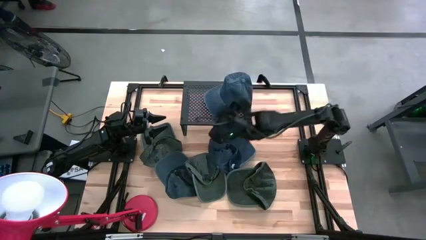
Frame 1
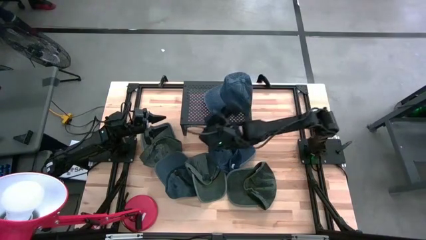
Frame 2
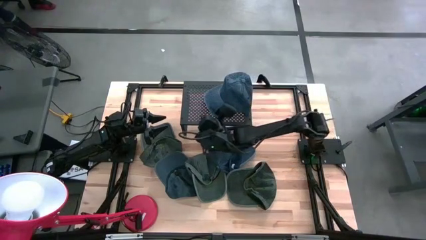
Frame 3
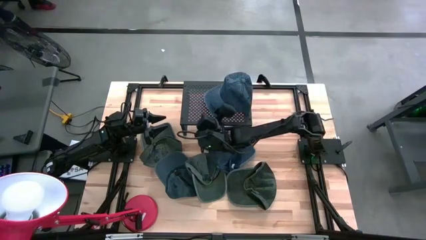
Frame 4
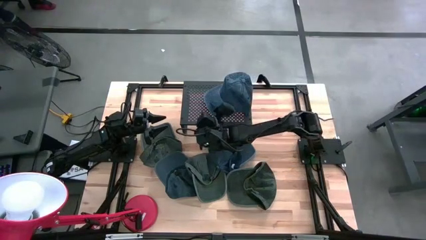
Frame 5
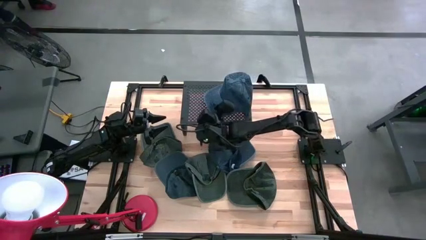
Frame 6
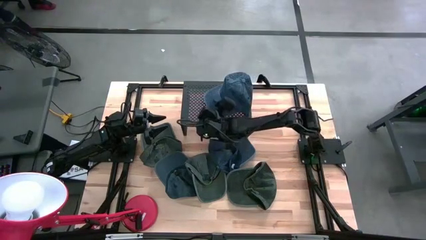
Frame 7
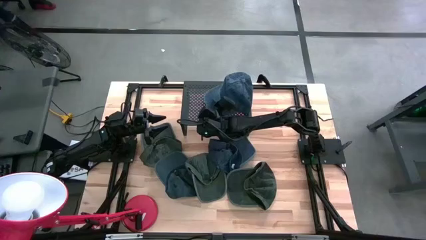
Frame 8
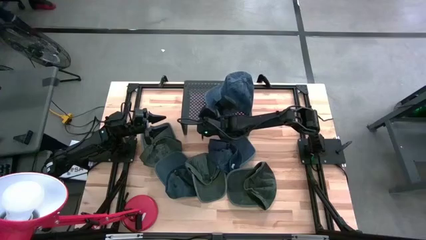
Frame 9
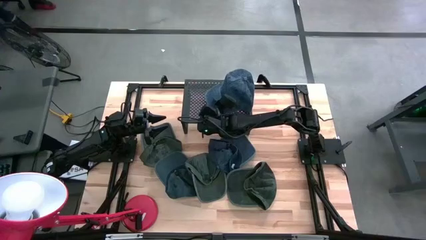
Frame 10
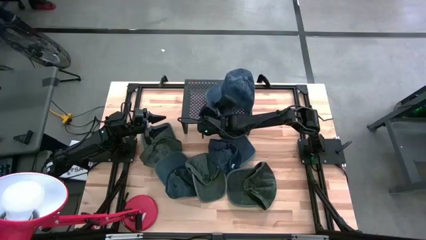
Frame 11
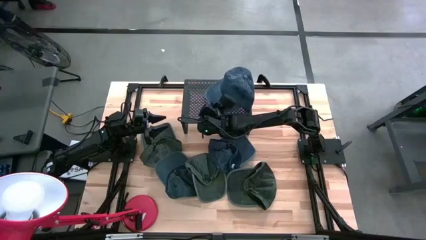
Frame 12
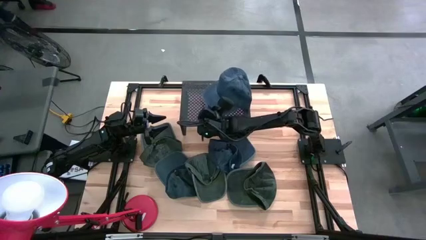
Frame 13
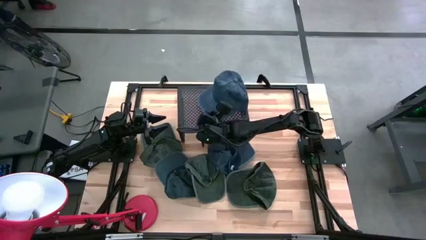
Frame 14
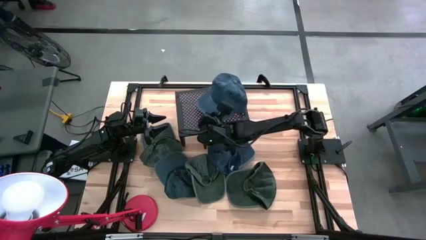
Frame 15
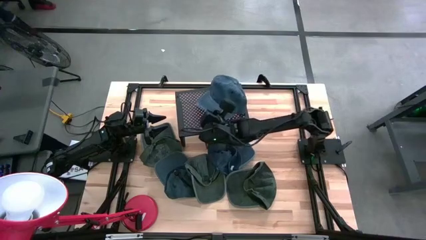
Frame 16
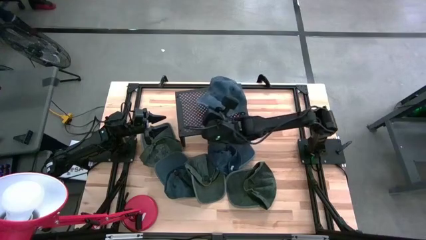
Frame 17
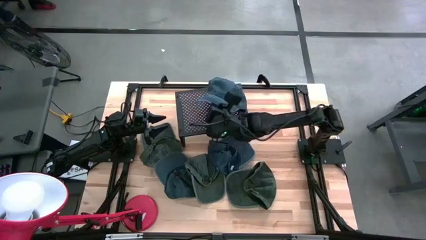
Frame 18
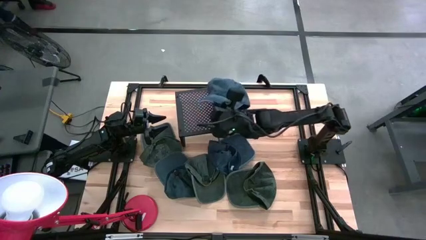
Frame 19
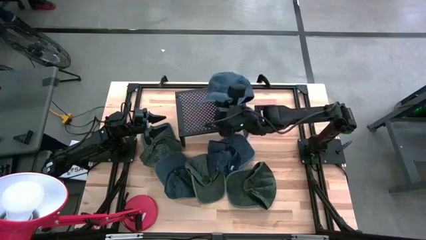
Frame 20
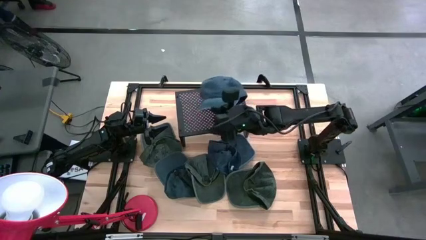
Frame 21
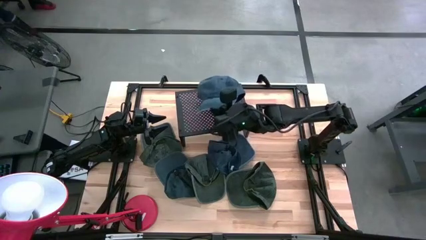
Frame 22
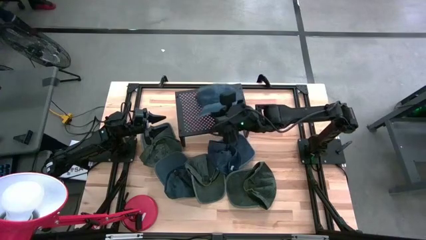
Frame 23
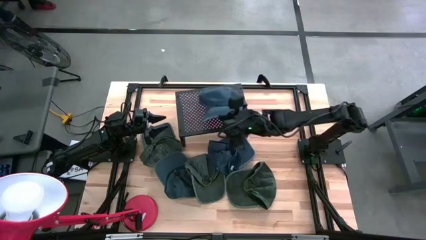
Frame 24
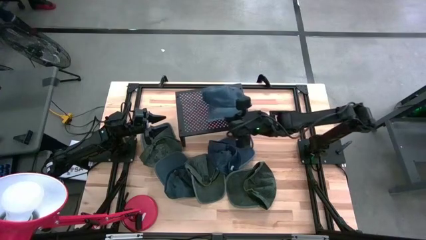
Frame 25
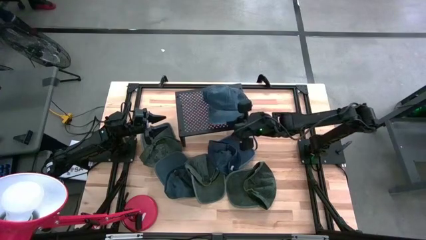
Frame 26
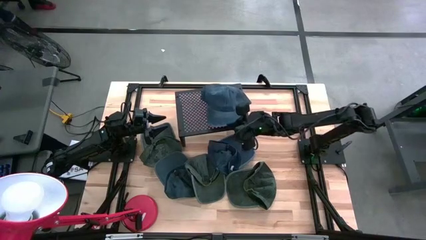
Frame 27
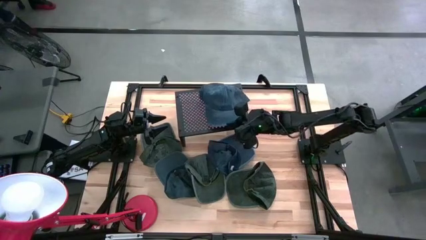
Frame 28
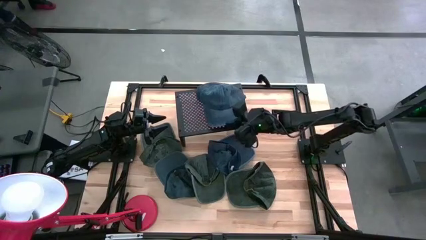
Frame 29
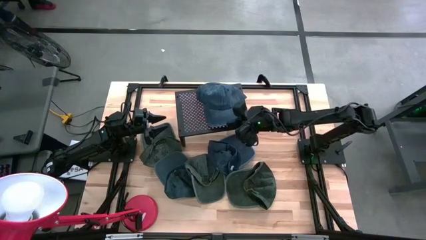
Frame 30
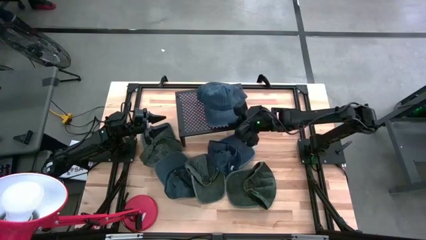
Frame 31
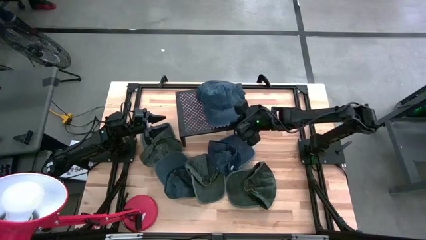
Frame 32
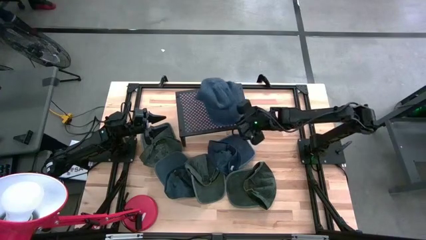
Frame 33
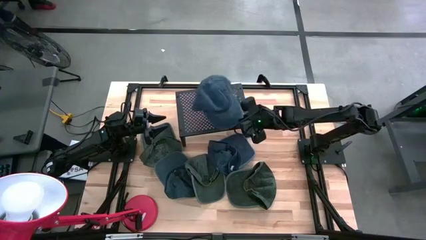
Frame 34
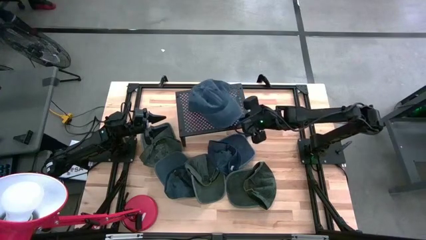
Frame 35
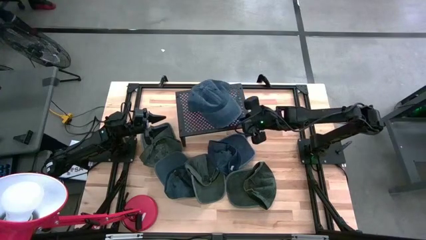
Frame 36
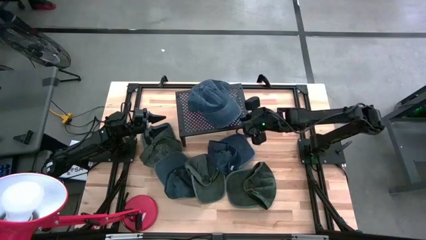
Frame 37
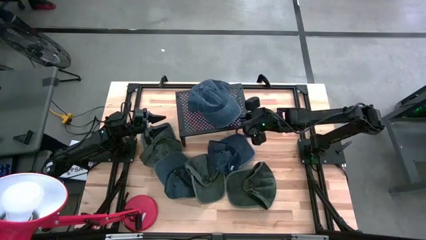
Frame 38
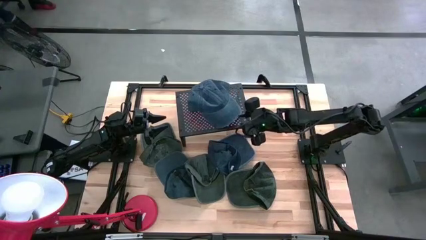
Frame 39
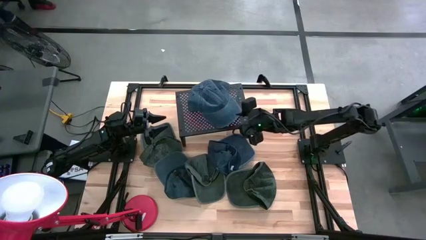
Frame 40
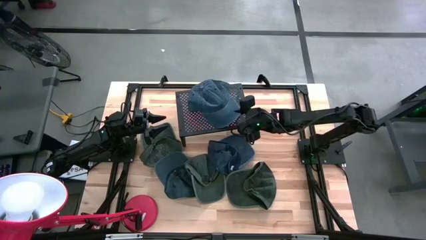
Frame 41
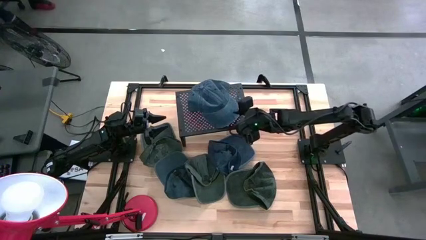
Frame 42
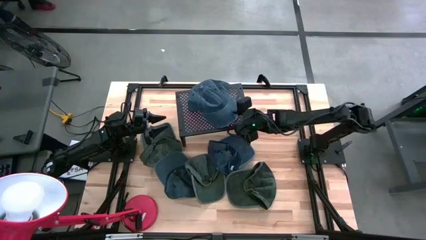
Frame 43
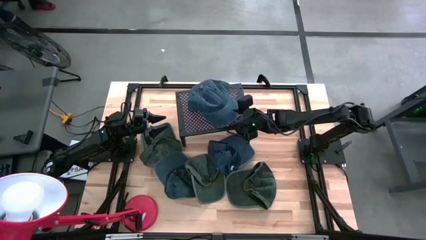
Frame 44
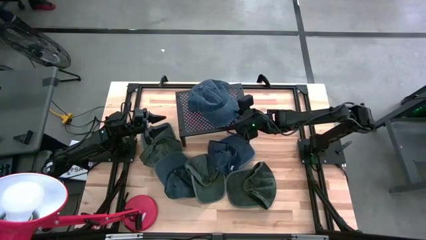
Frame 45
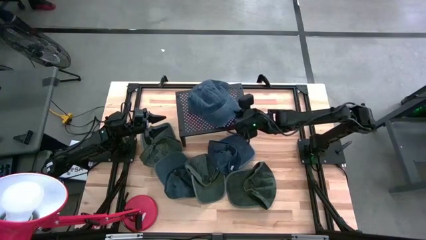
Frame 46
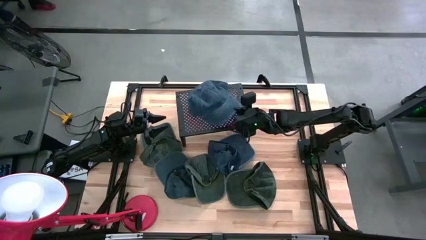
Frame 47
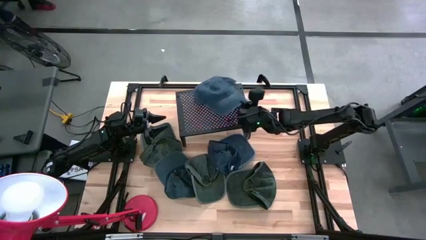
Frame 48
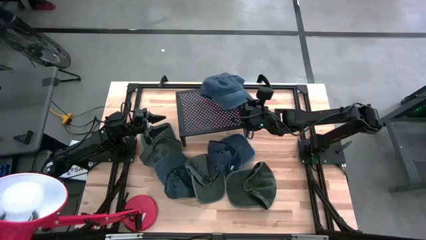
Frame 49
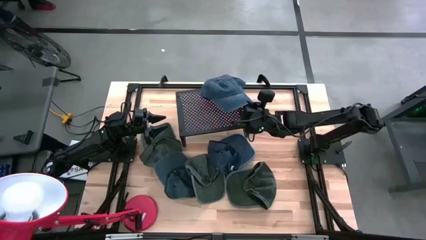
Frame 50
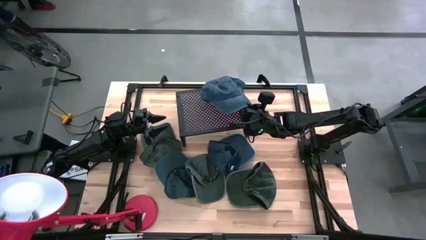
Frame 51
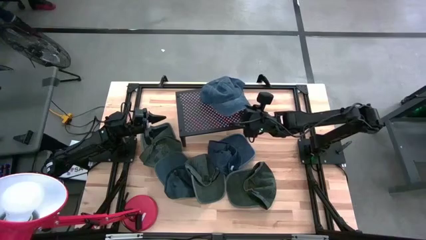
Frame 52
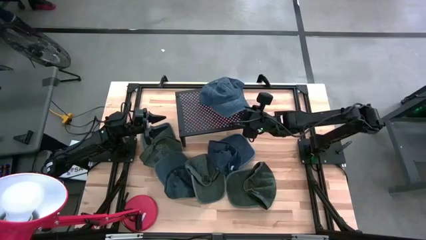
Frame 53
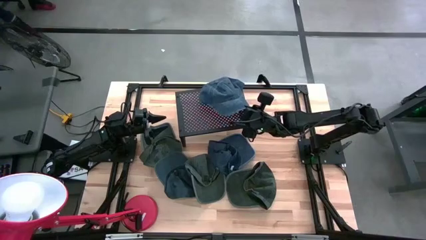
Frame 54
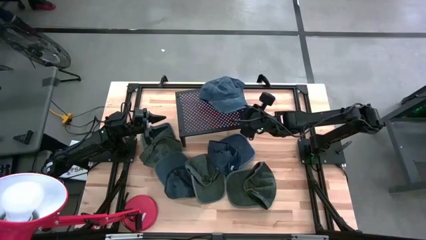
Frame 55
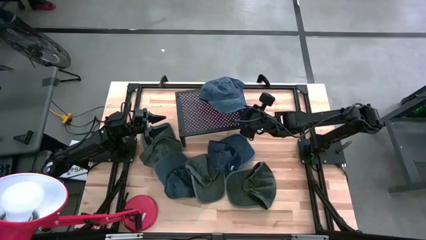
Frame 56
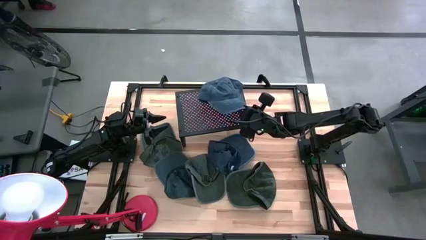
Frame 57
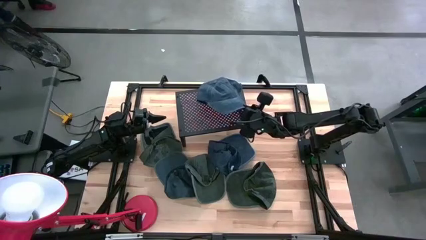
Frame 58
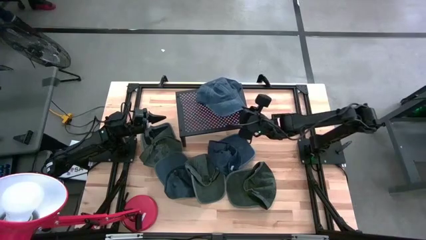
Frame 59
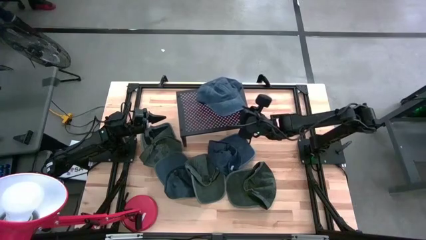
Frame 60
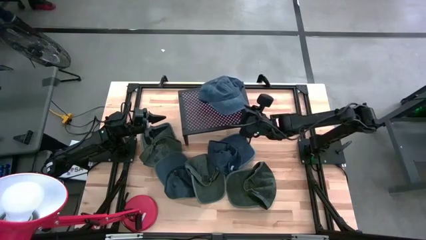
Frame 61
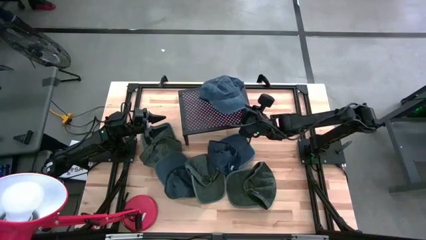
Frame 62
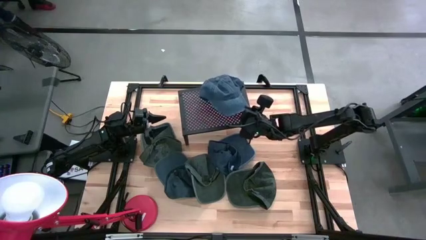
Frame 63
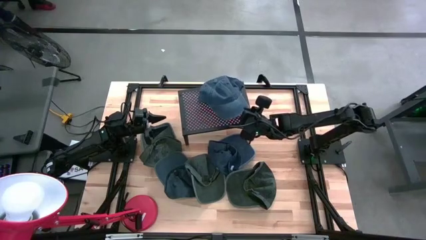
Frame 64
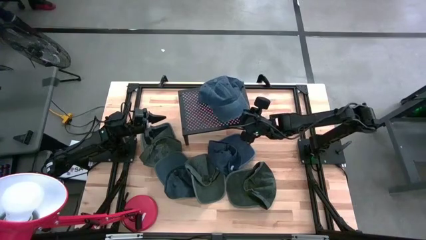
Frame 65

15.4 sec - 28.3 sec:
Task: Pick & Place hat
Stack the dark blue cap on the shelf
